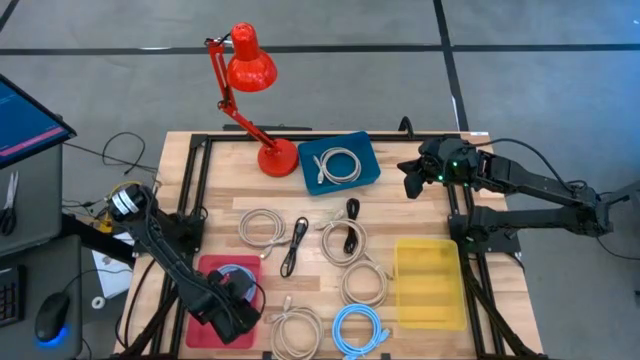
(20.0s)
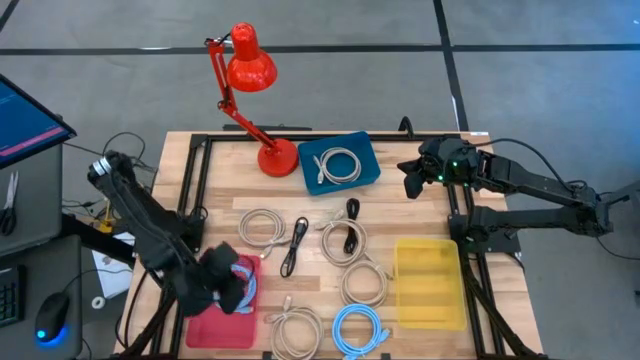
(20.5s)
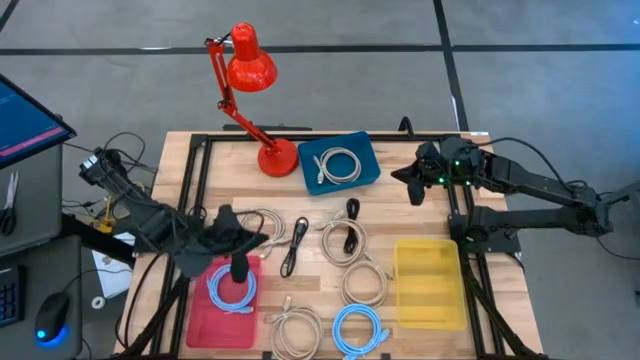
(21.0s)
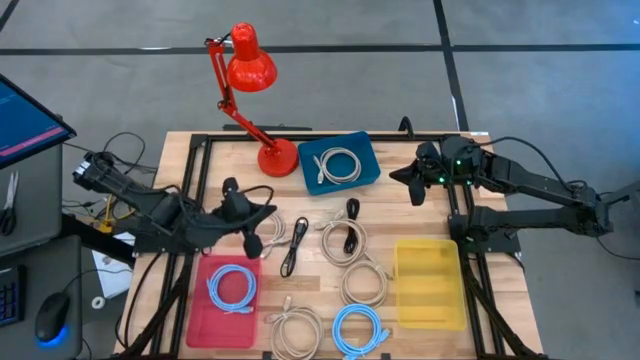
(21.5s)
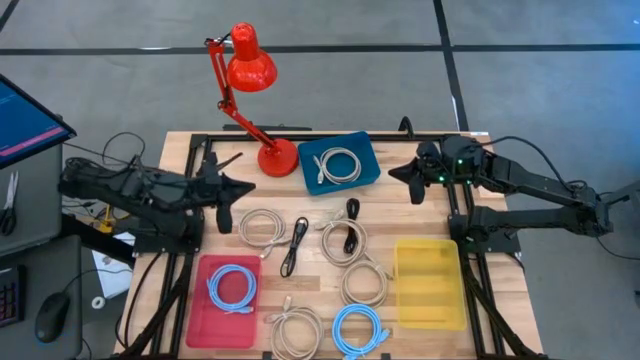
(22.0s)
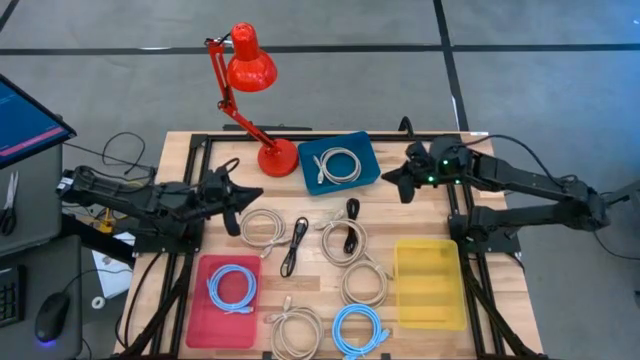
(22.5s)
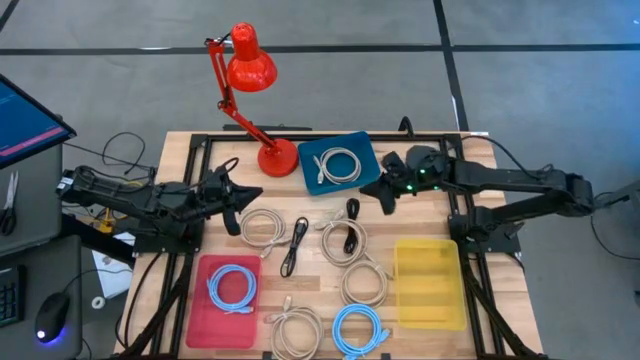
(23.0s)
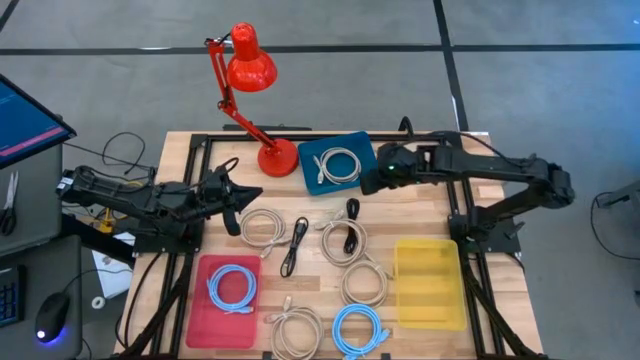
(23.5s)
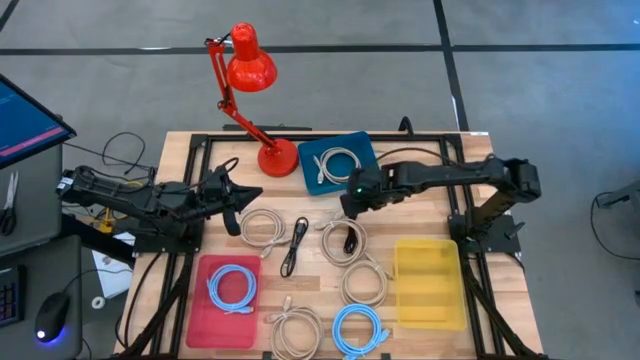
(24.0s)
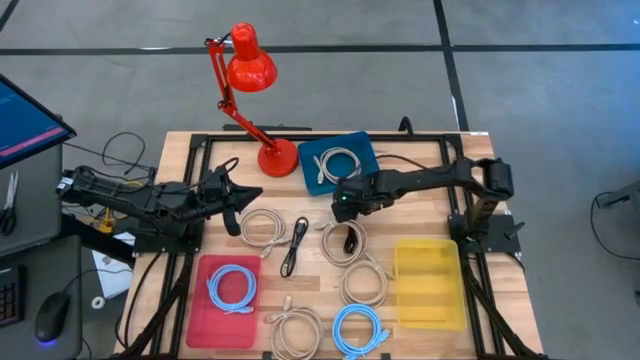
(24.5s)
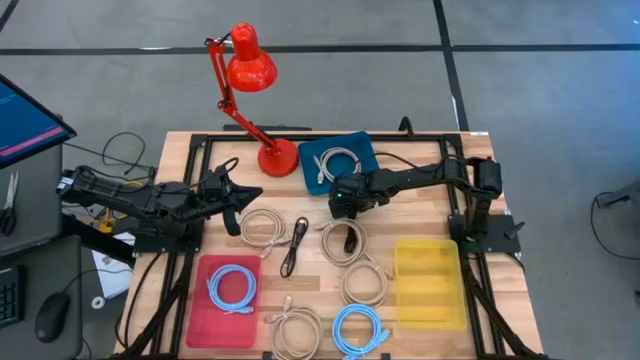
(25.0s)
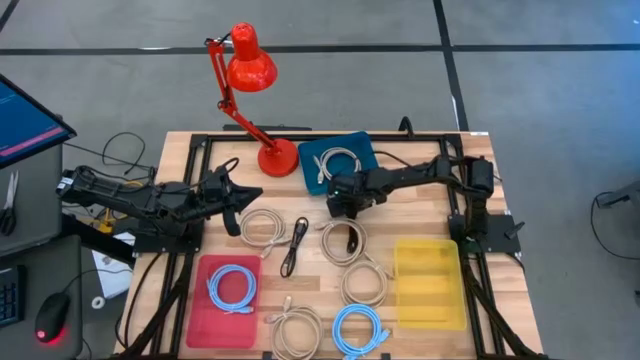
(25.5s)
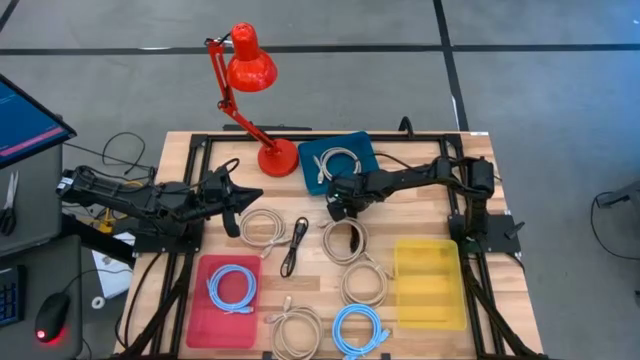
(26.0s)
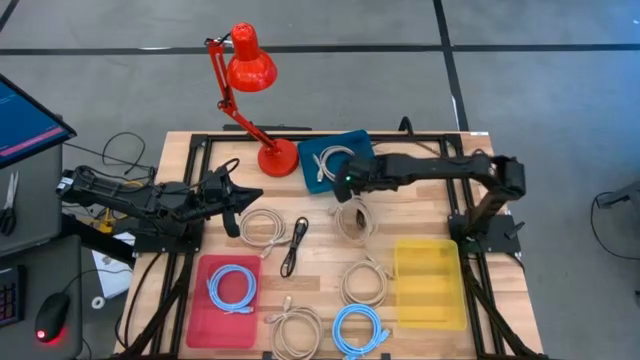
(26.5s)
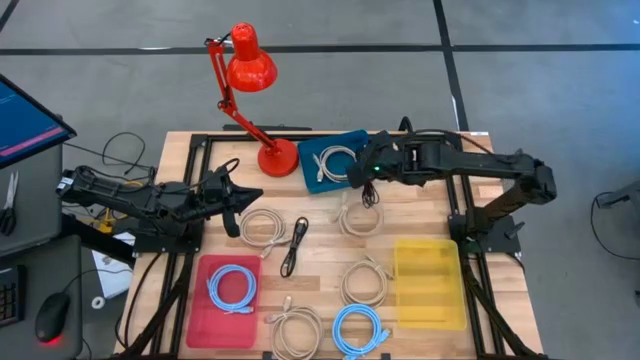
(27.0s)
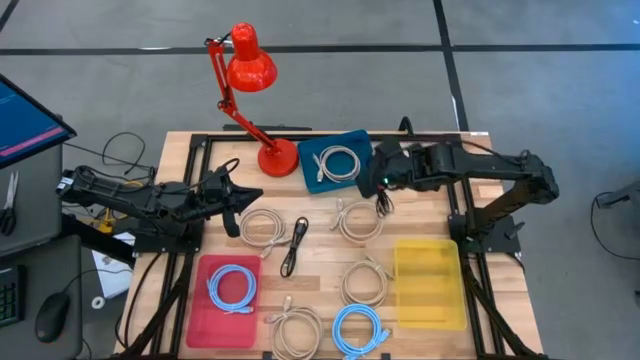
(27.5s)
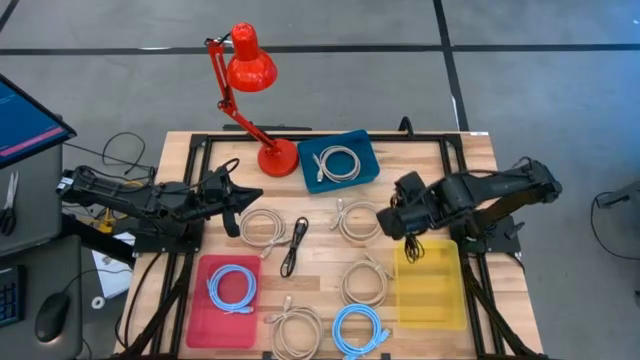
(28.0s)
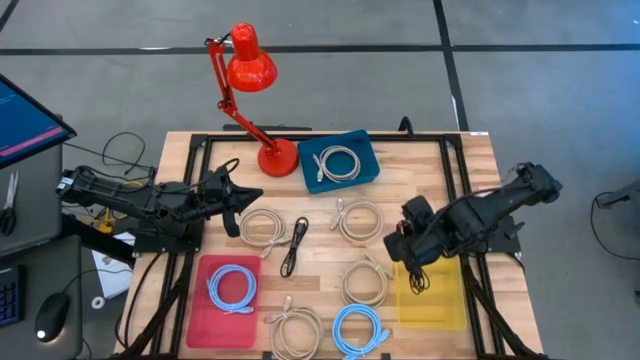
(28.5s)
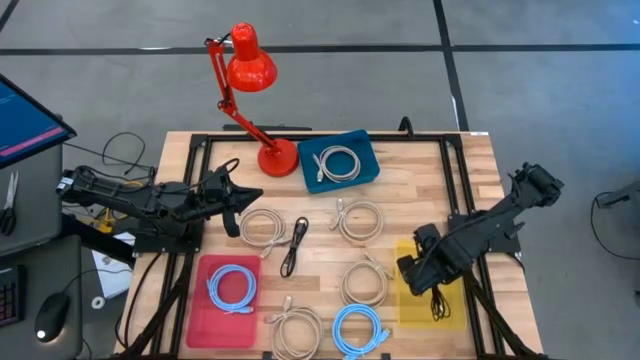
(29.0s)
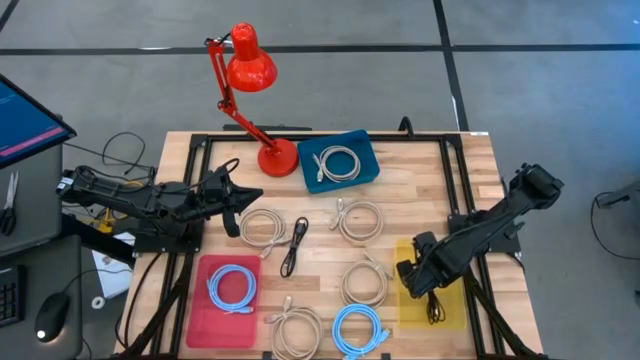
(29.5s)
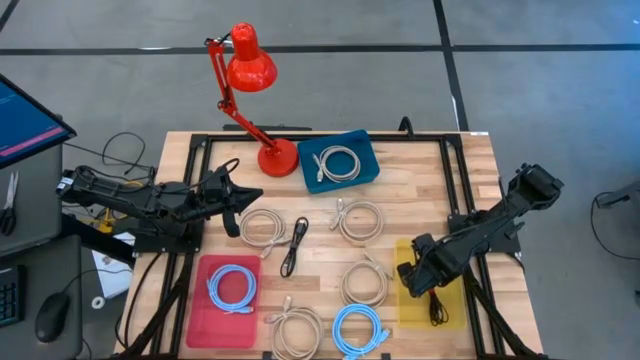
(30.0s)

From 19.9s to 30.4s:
Task: Sort HDMI cables
Put the black HDMI cable into the yellow bin

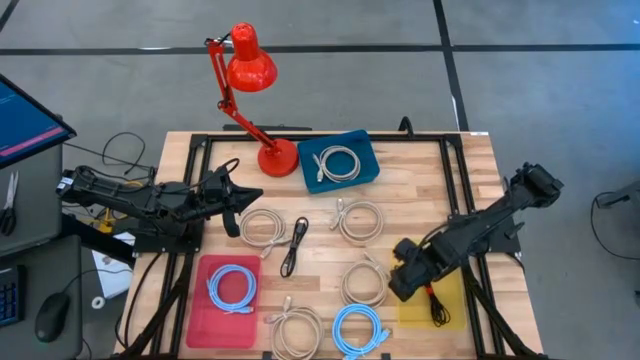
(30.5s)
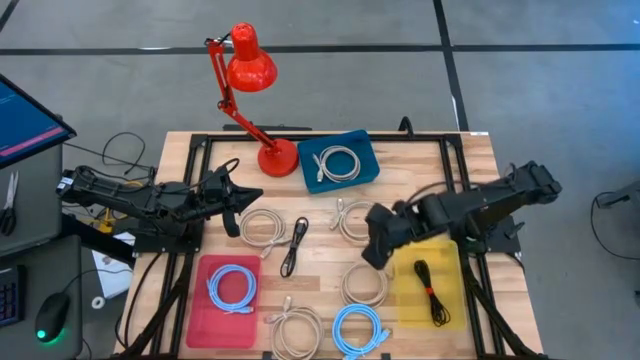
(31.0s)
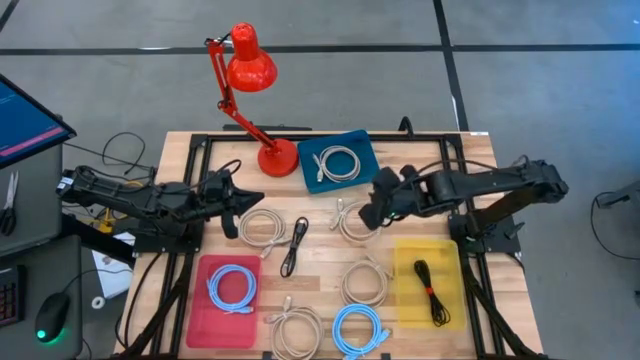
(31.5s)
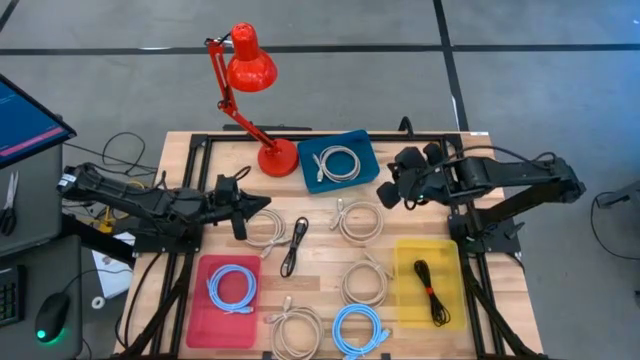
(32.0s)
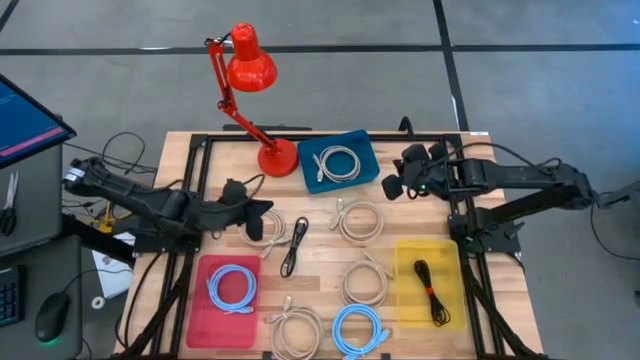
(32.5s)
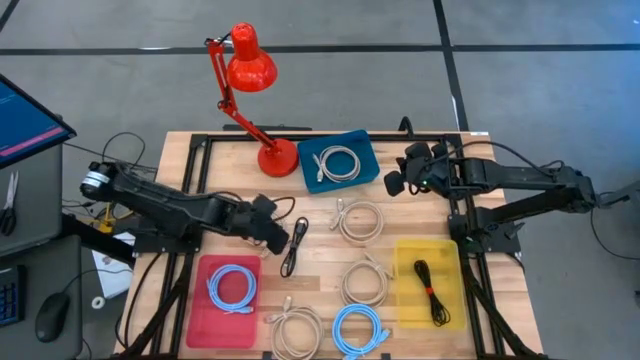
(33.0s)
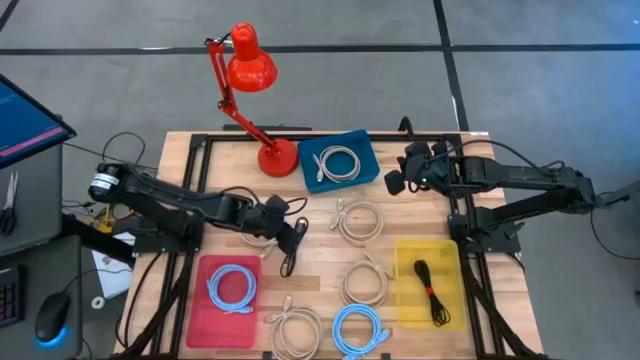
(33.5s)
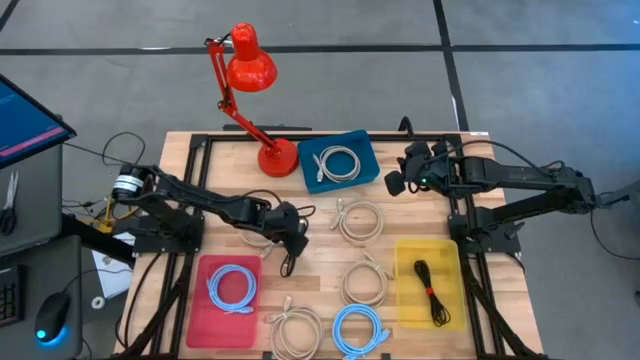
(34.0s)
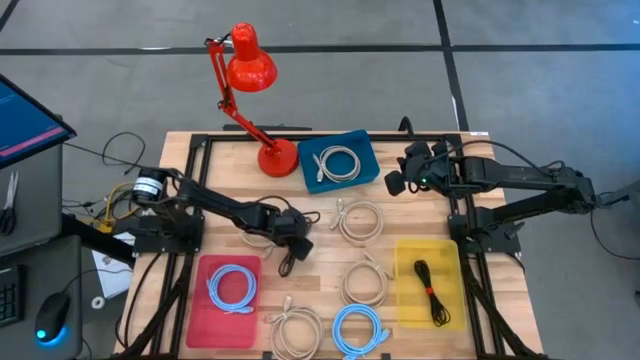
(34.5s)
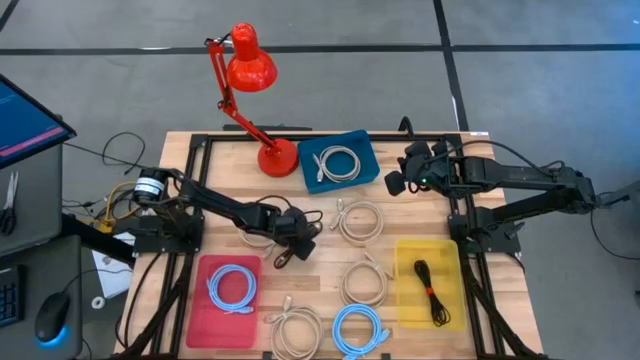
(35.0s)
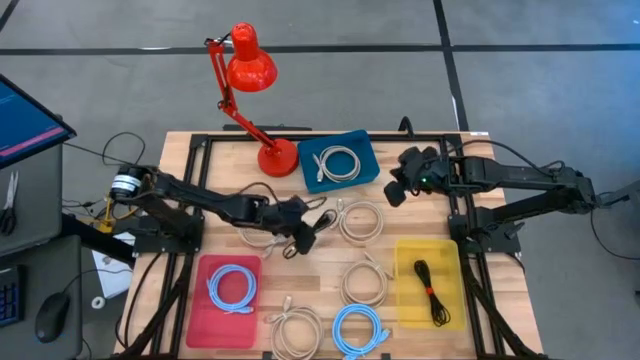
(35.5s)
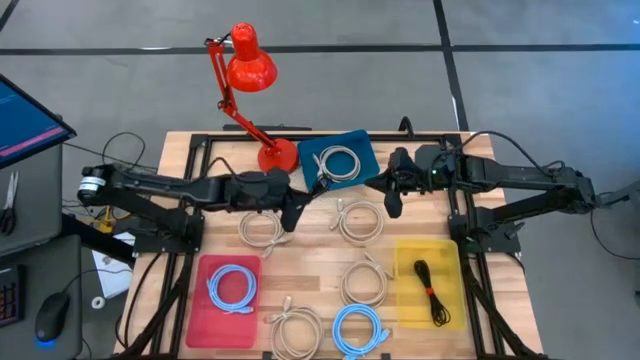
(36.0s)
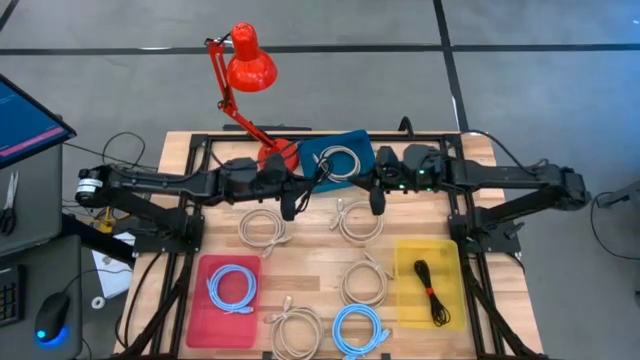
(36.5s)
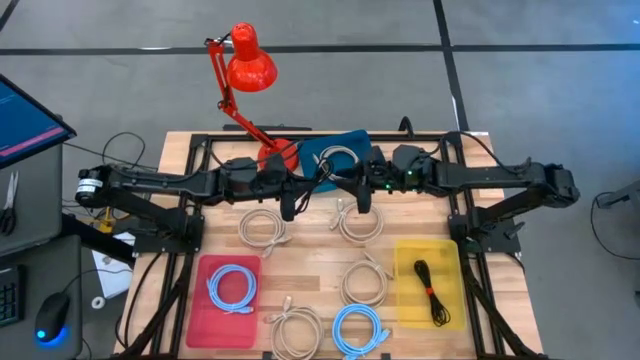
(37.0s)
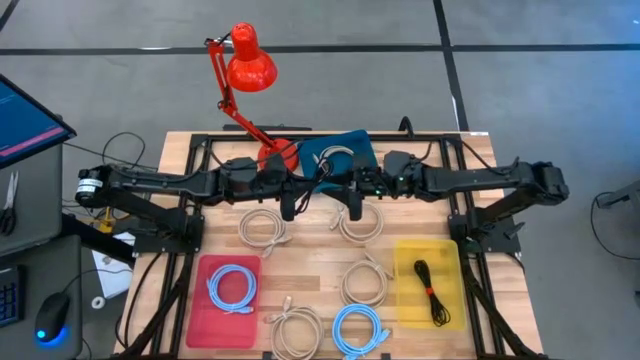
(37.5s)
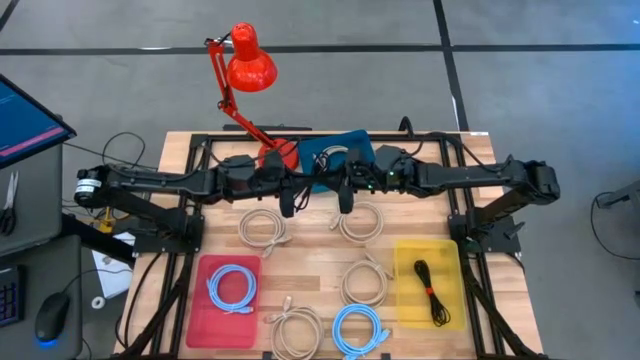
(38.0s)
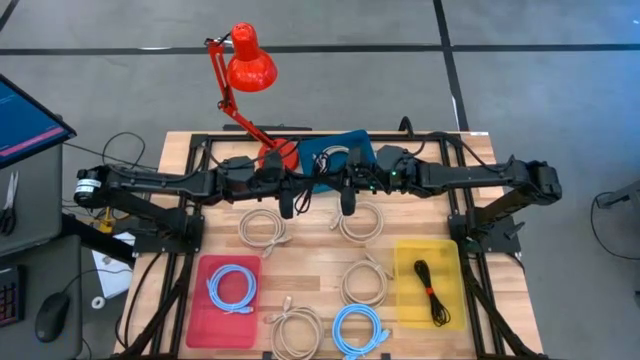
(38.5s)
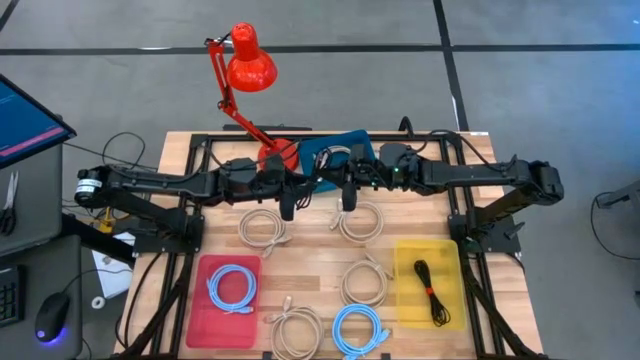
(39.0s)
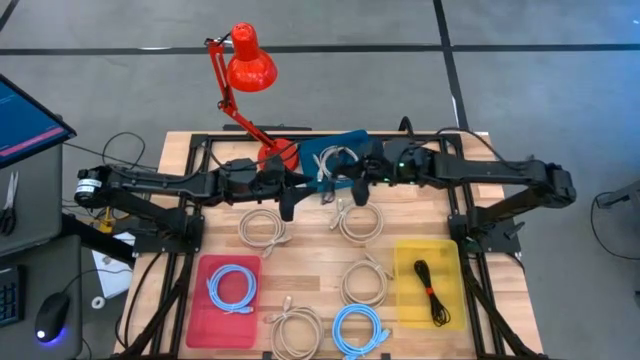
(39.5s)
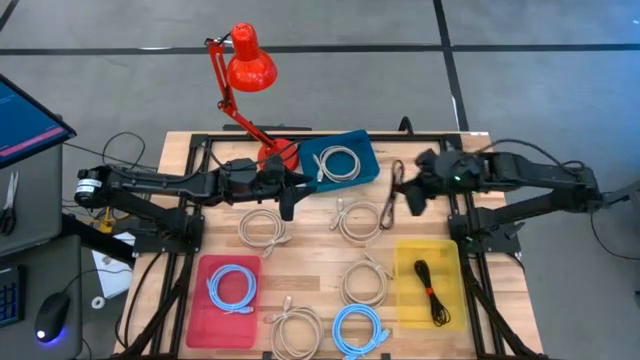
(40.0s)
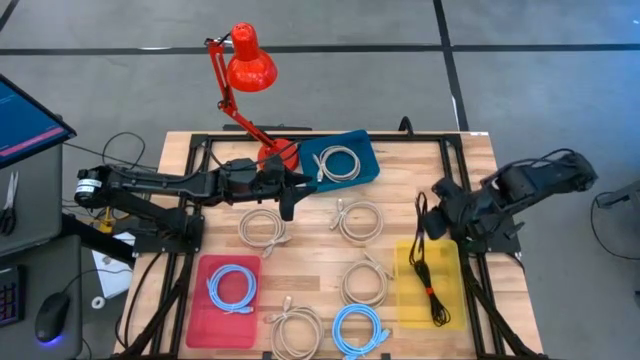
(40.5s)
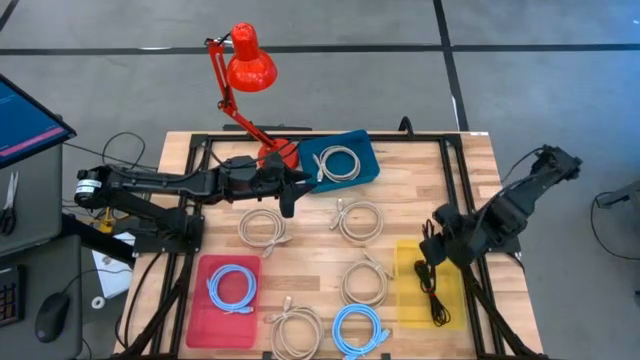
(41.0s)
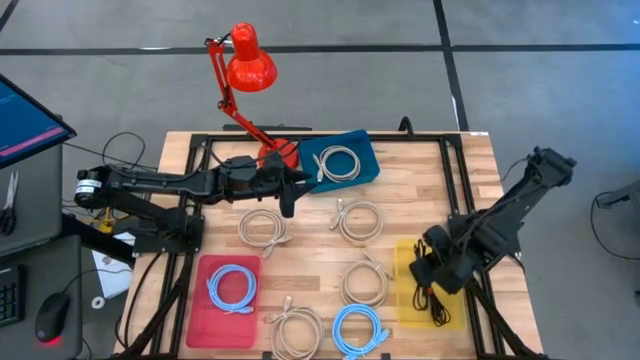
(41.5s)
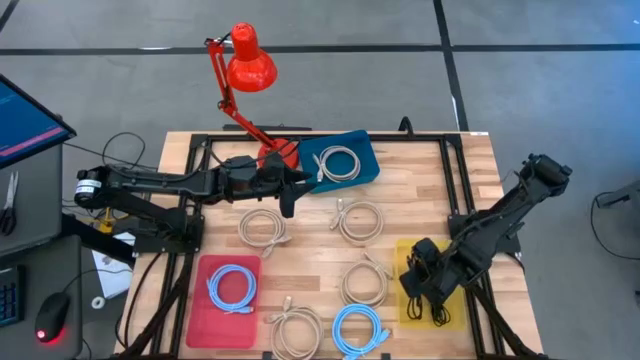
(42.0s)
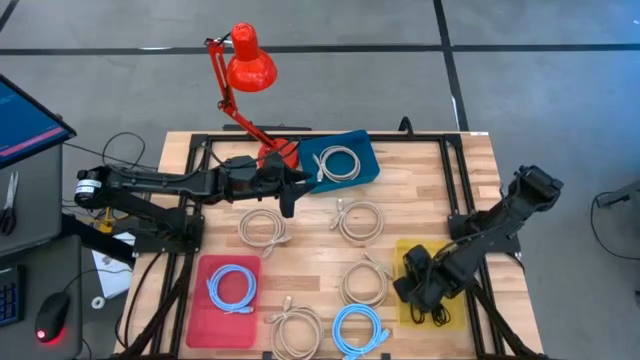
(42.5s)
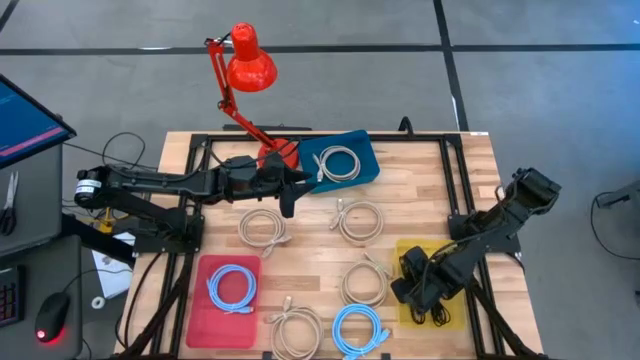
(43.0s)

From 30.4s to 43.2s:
Put the black HDMI cable into the yellow bin
